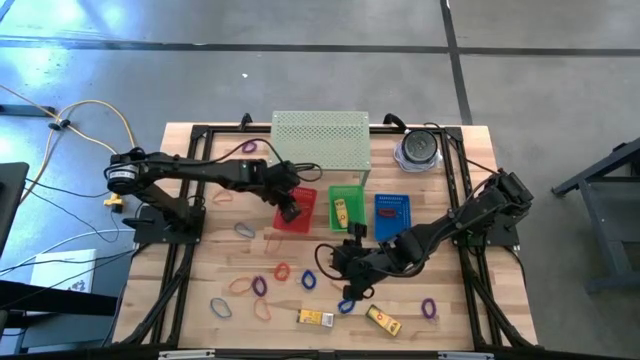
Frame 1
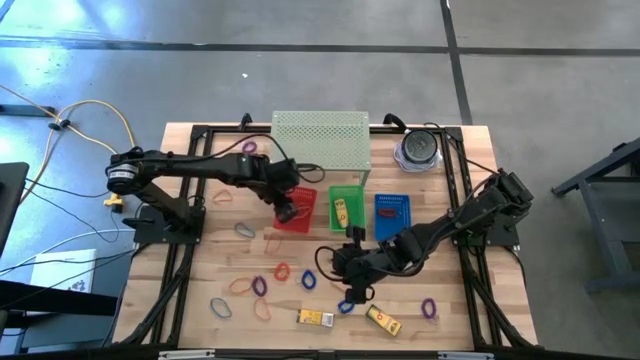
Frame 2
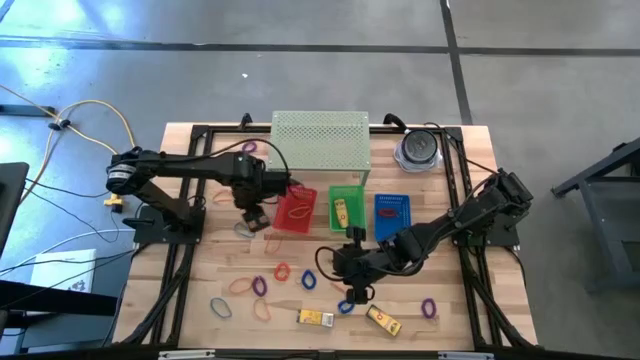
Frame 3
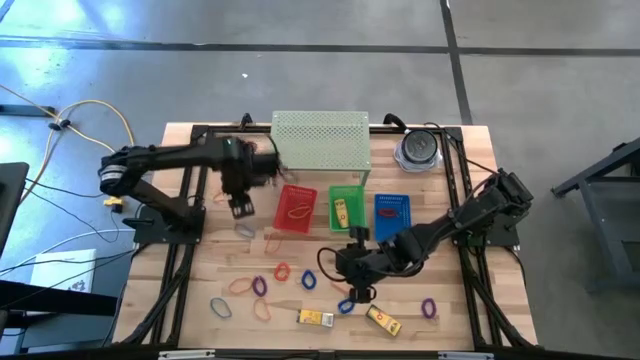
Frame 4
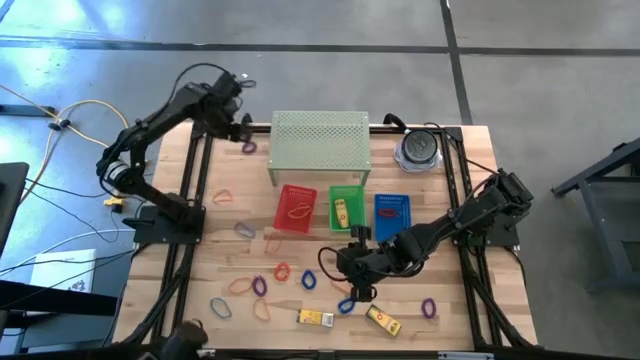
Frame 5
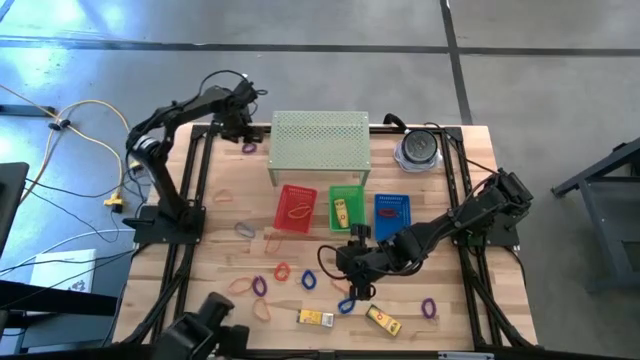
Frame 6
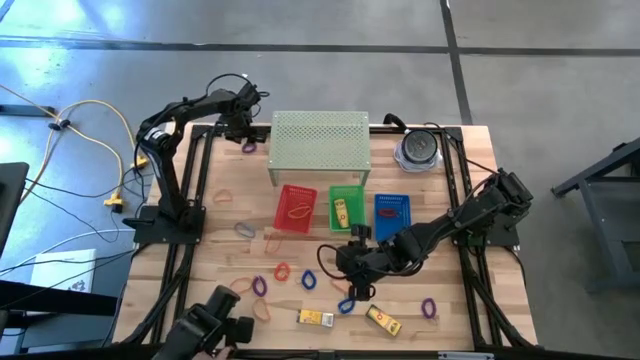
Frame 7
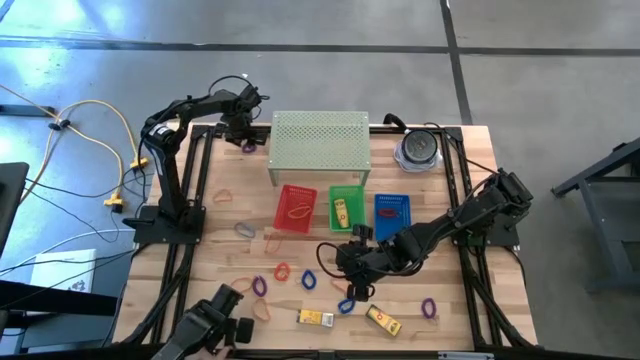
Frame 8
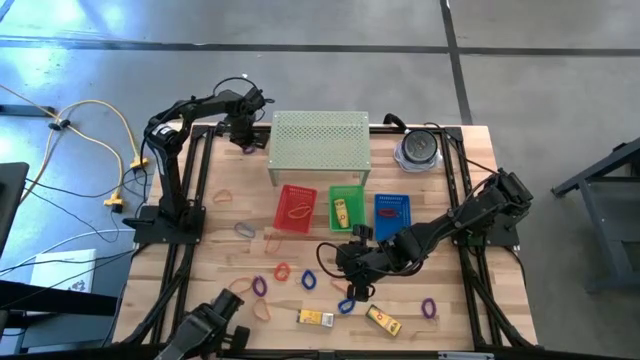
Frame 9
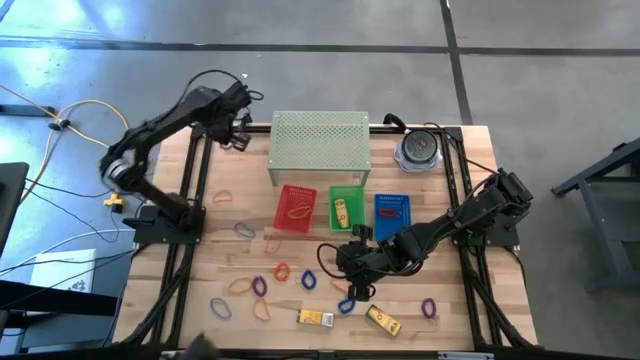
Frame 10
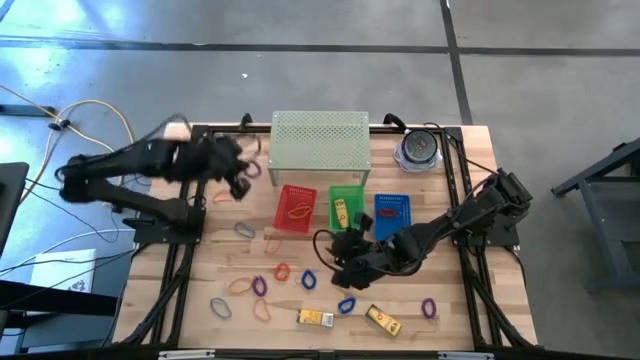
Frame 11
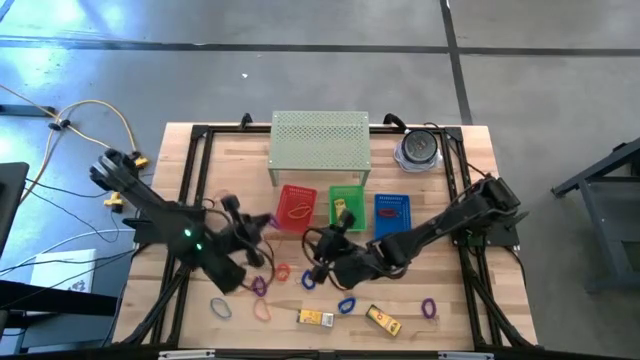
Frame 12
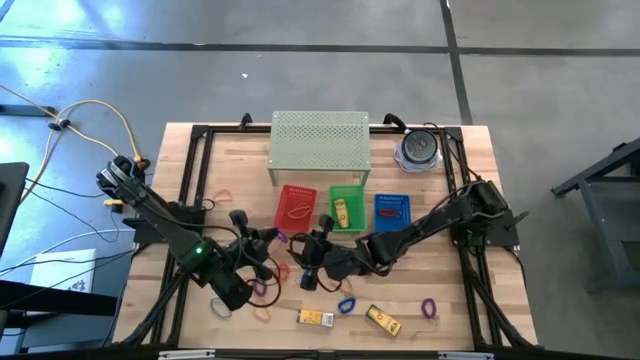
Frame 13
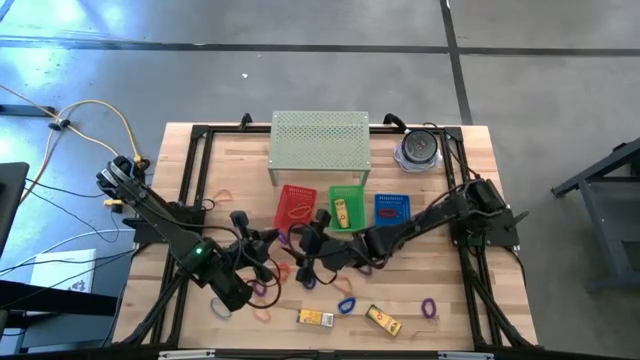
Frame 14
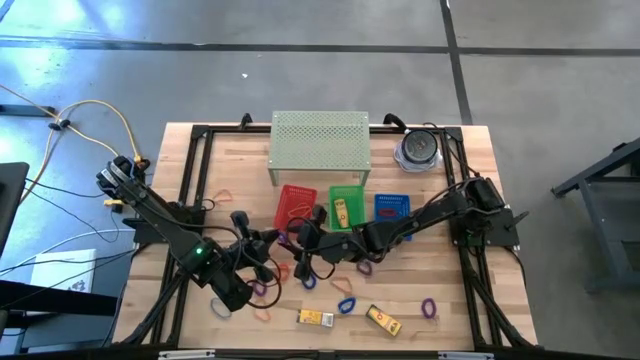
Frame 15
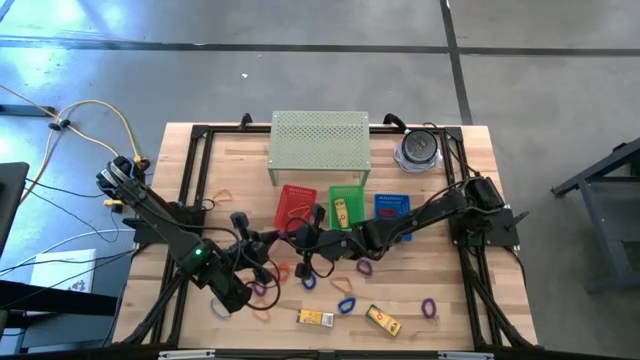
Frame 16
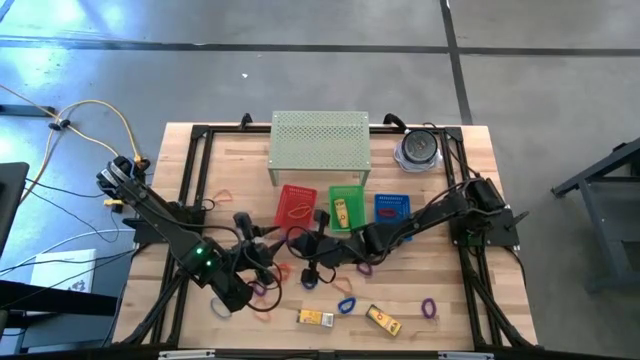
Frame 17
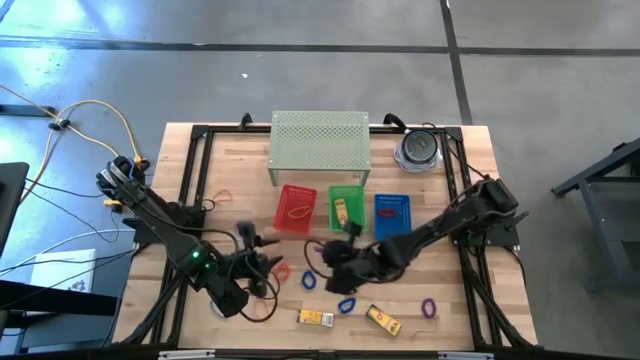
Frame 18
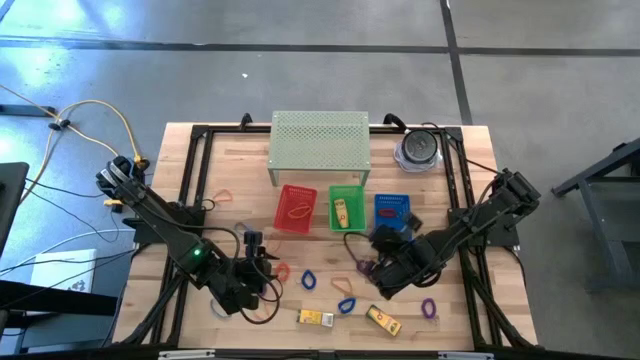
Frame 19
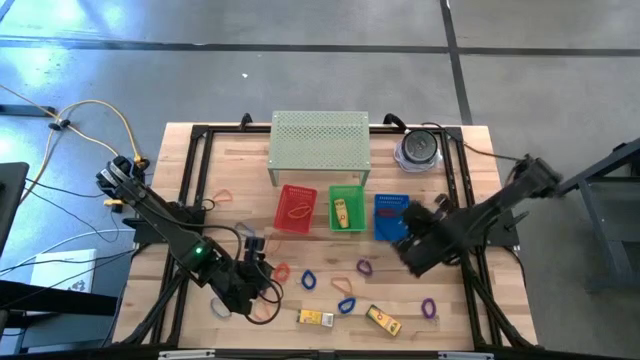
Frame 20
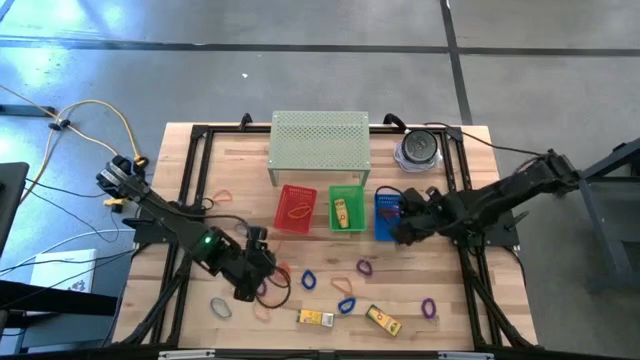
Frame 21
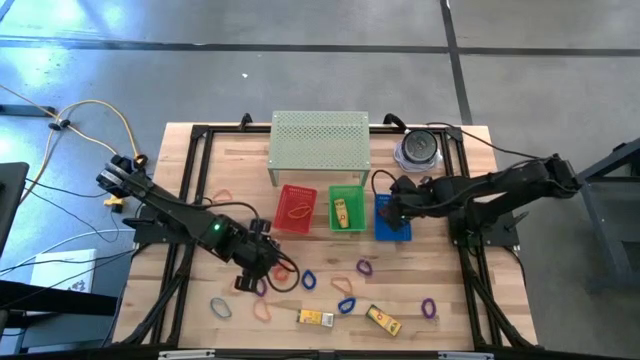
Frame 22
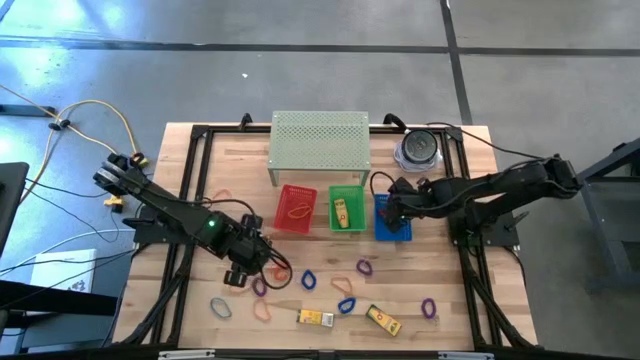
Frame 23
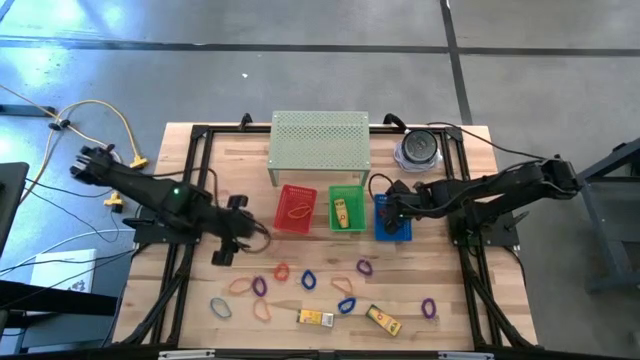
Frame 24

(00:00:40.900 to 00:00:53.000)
Task: Pick & Place Office Desk Supplies
Put the purple spring keychain into the blue bin

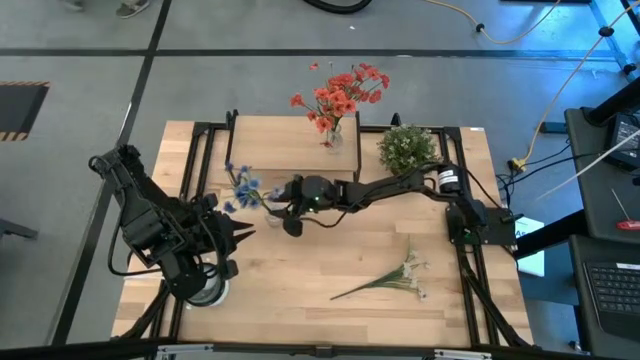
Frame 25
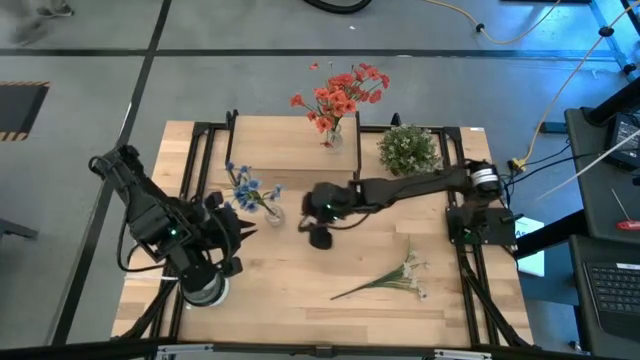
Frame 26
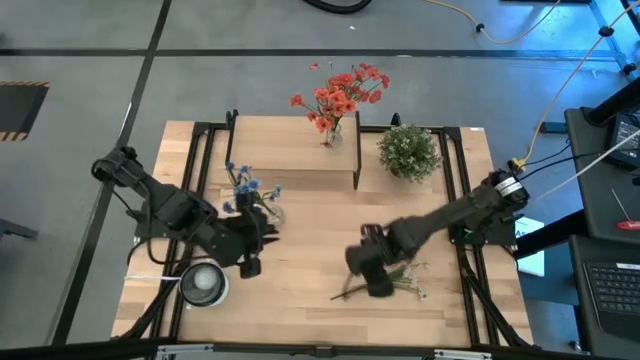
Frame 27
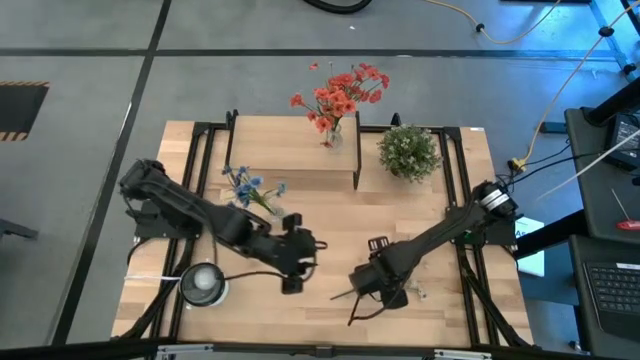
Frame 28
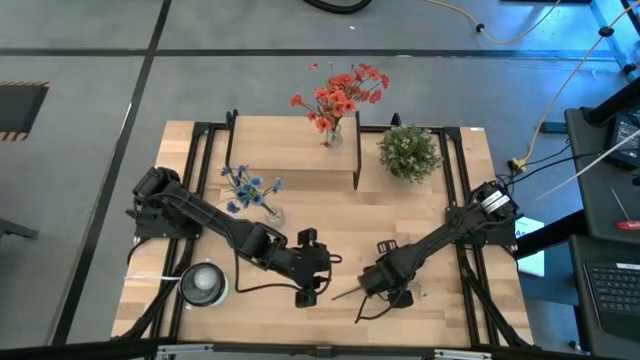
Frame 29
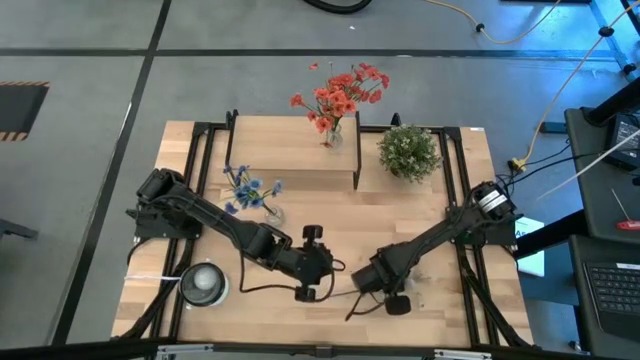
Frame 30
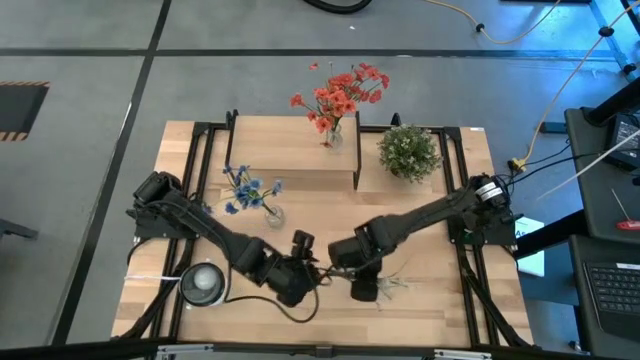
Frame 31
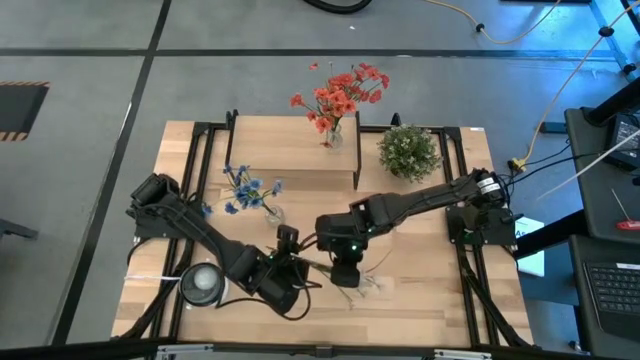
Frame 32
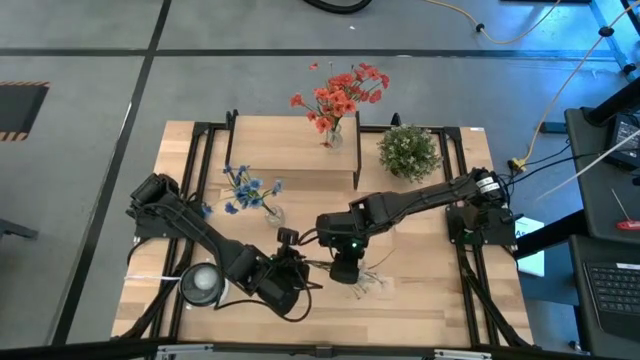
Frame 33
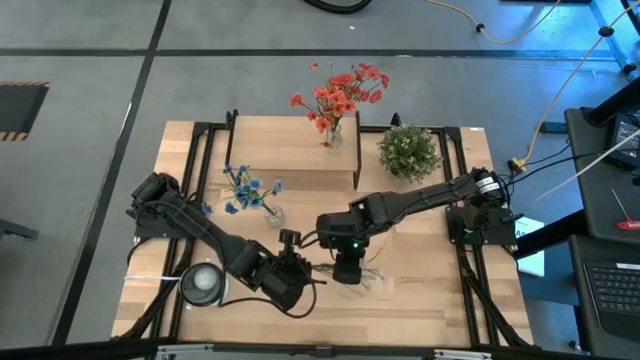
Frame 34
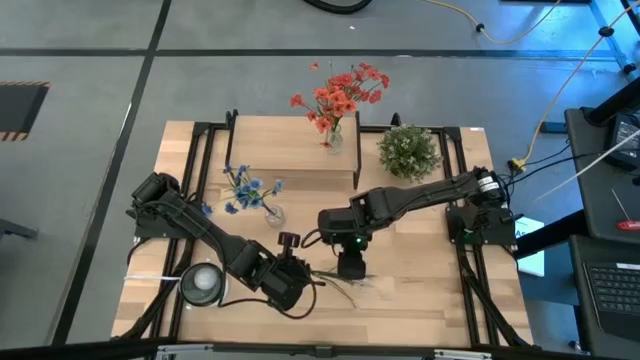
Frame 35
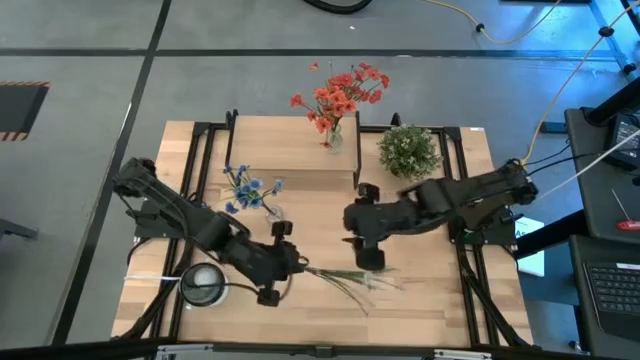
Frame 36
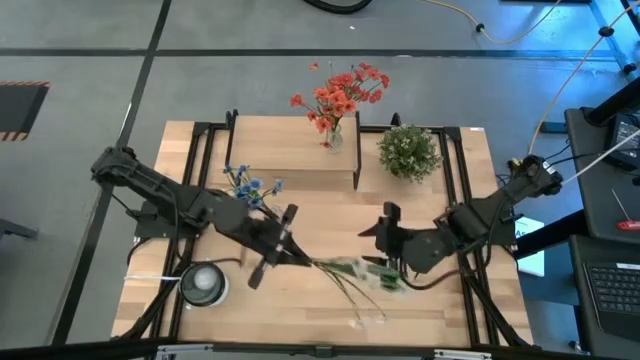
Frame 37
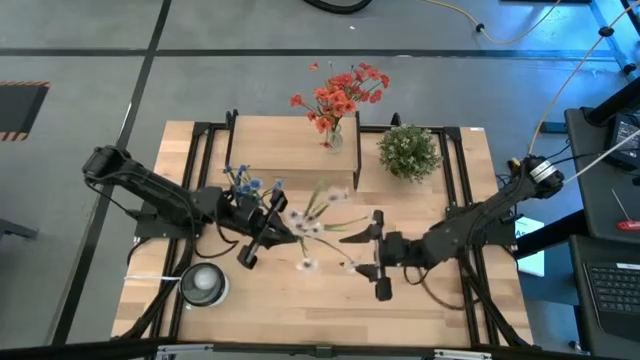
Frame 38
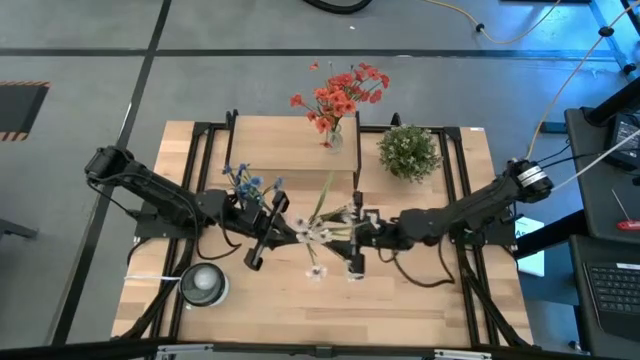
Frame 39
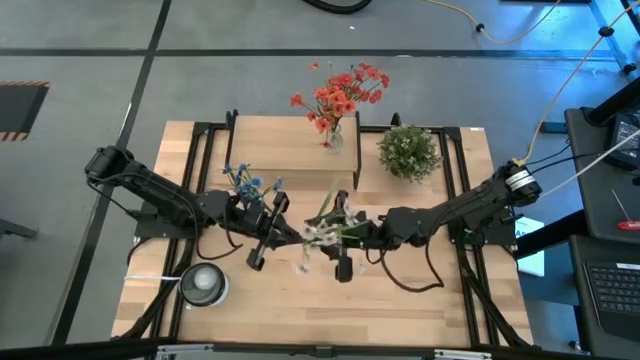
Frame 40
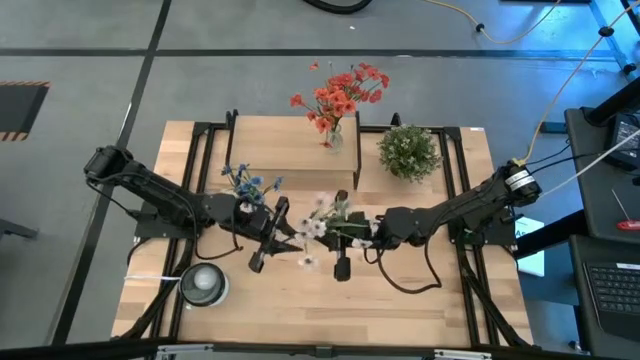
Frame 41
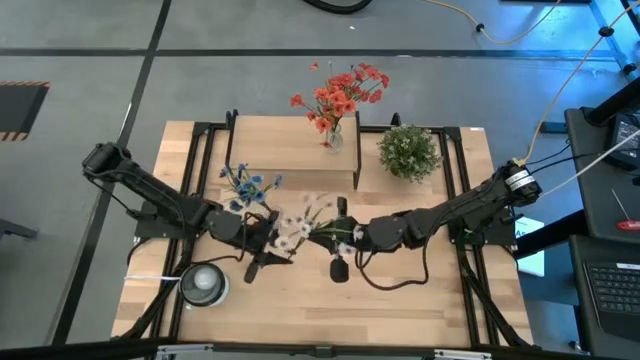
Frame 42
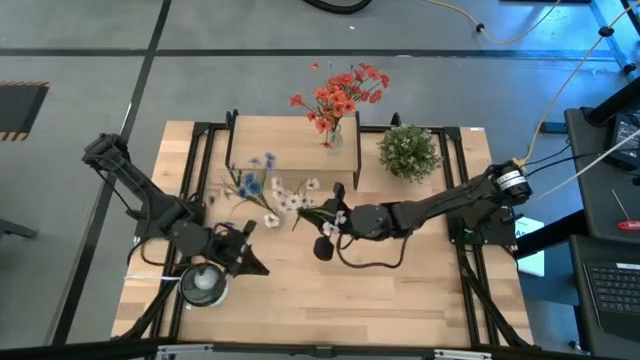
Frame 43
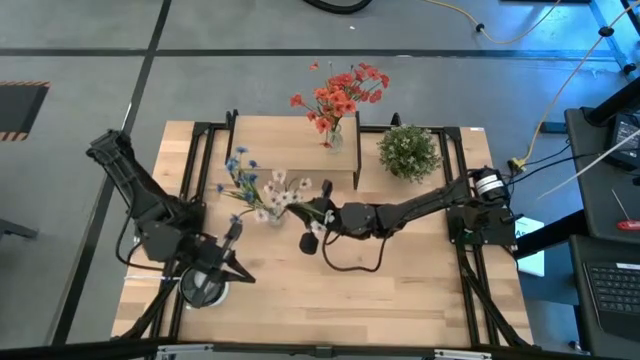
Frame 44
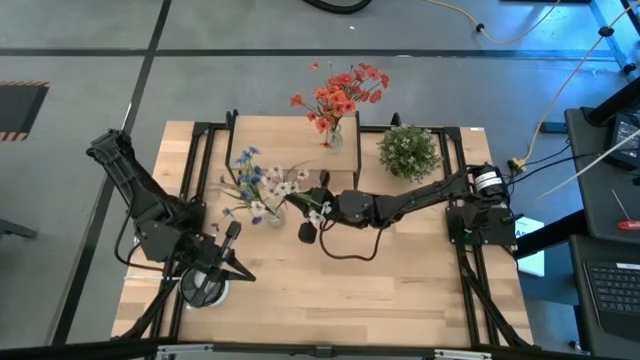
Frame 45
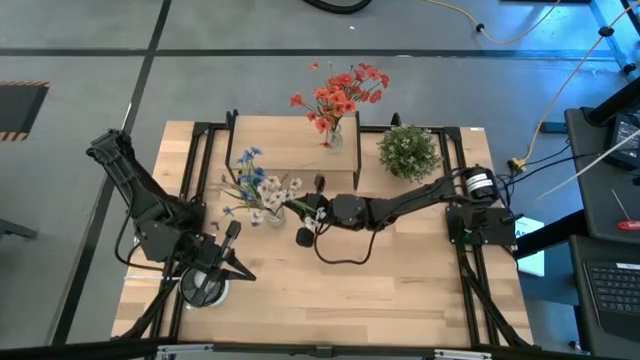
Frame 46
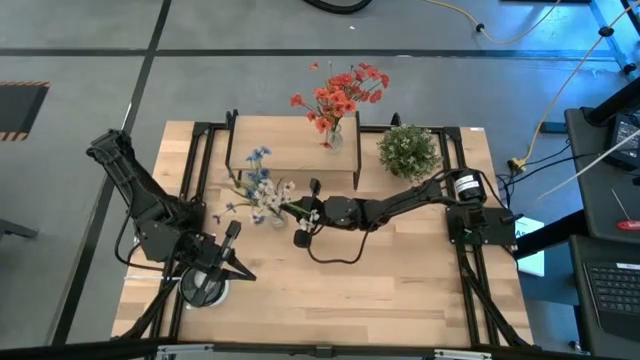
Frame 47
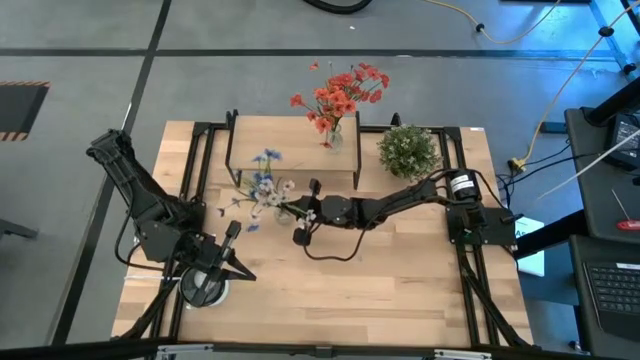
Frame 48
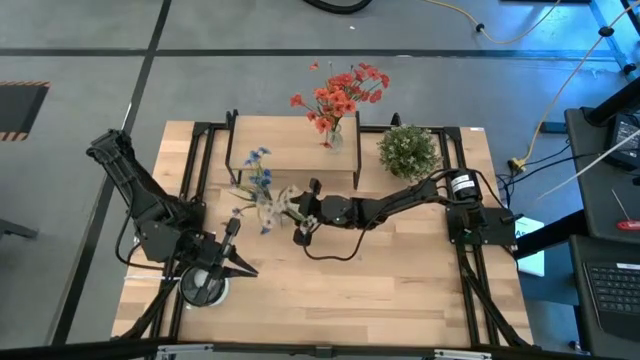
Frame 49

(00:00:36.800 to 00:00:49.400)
Task: Pick and place flowers into a vace then onto a shelf
Put the white flowers into the transparent vase
